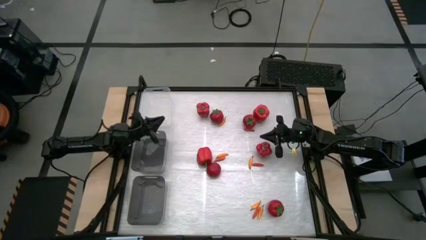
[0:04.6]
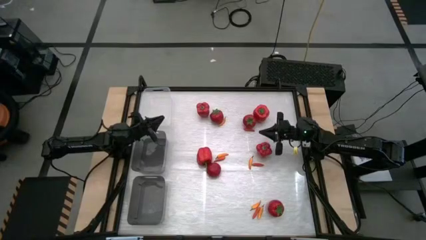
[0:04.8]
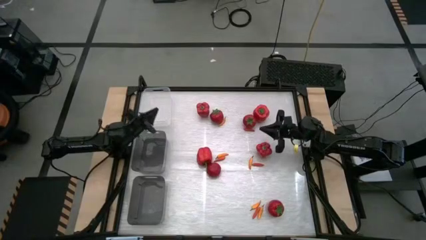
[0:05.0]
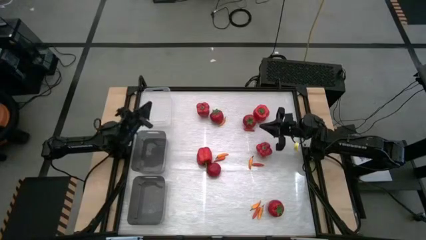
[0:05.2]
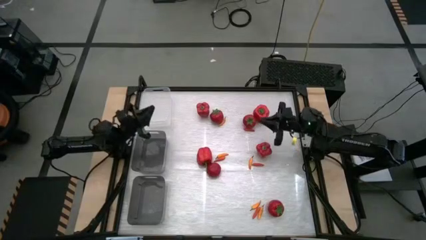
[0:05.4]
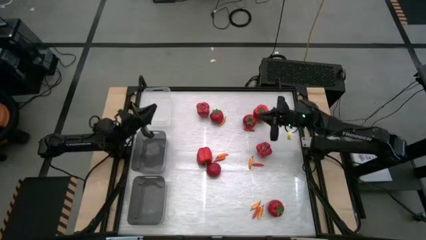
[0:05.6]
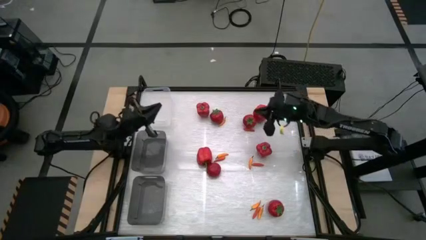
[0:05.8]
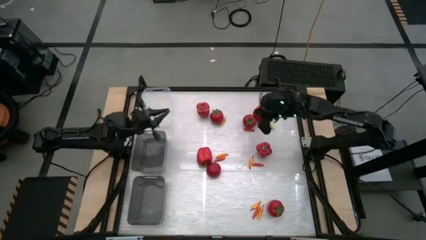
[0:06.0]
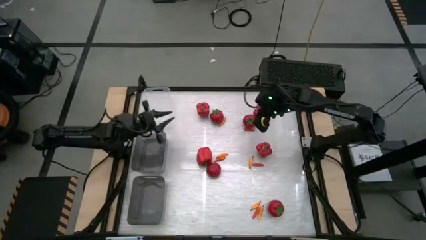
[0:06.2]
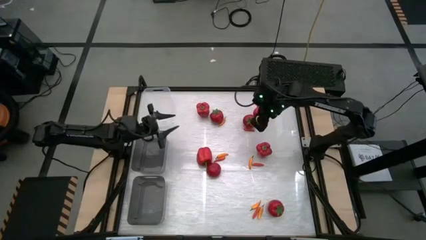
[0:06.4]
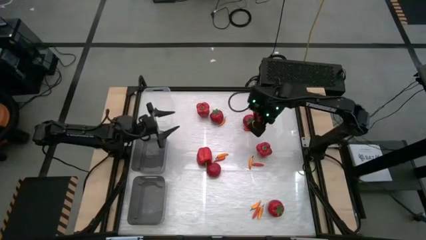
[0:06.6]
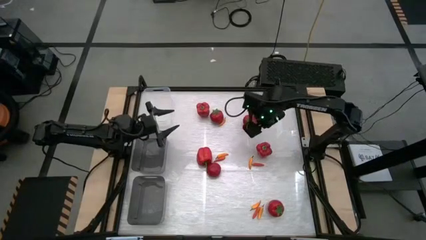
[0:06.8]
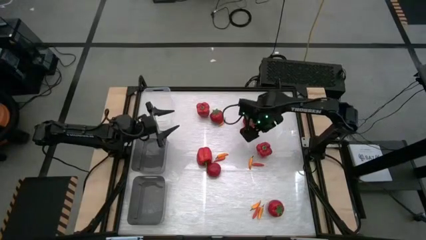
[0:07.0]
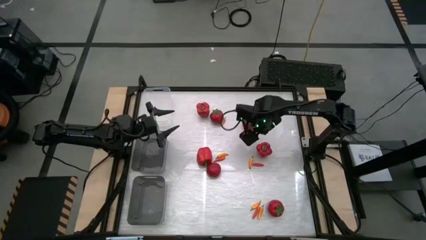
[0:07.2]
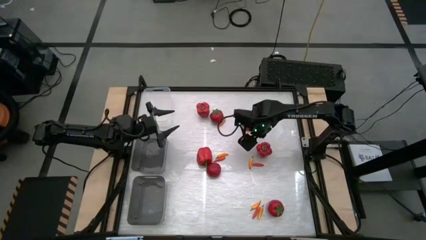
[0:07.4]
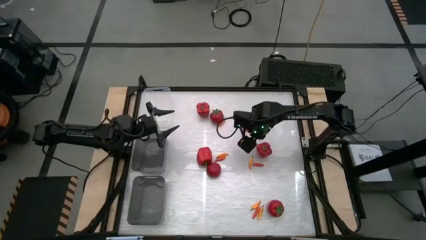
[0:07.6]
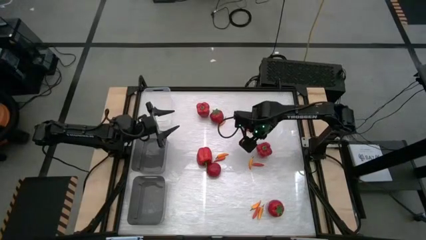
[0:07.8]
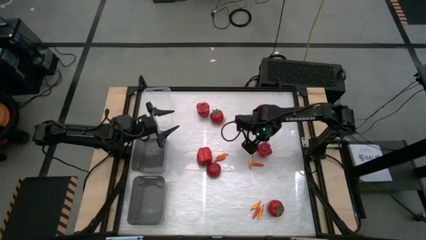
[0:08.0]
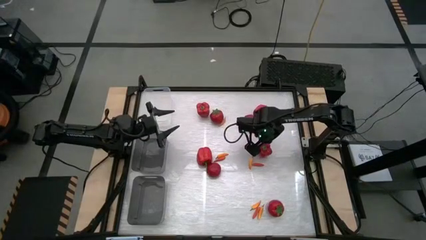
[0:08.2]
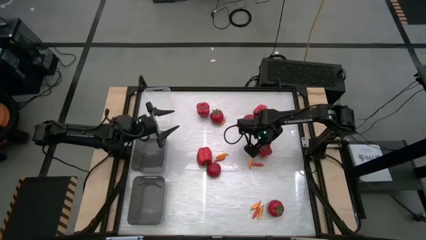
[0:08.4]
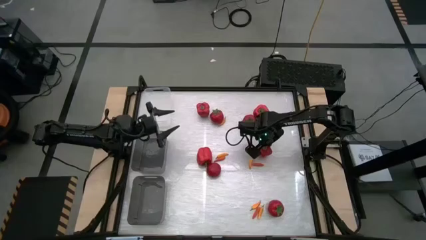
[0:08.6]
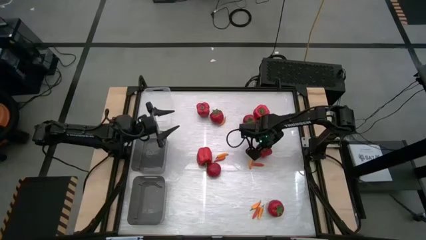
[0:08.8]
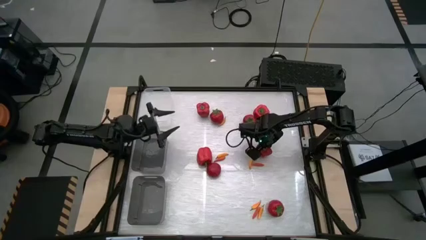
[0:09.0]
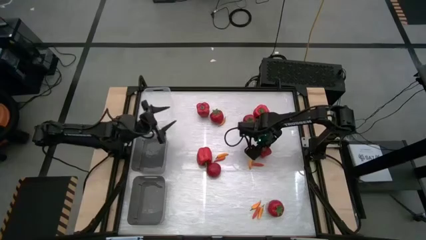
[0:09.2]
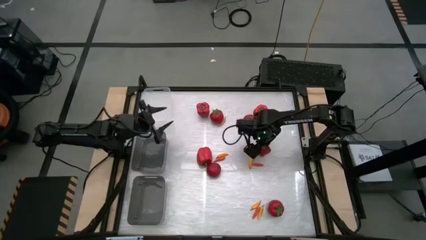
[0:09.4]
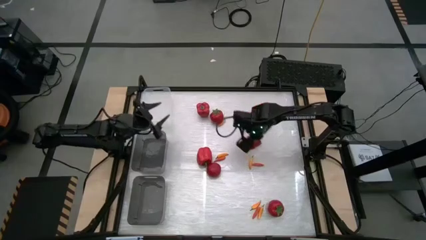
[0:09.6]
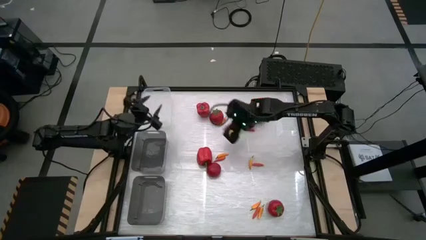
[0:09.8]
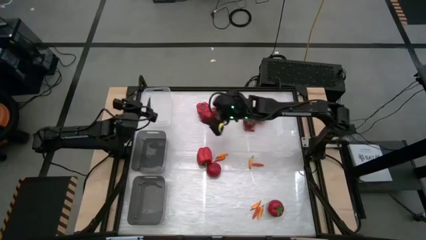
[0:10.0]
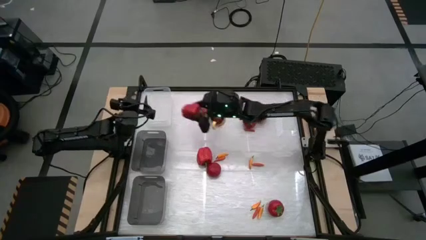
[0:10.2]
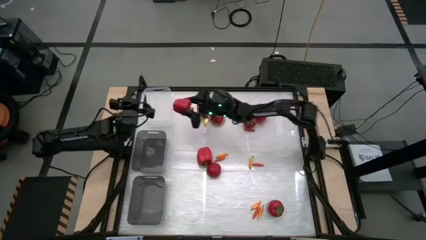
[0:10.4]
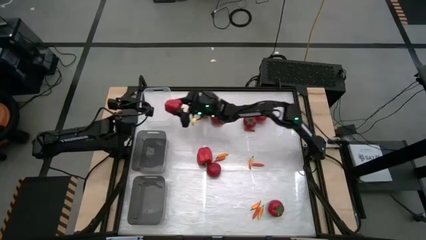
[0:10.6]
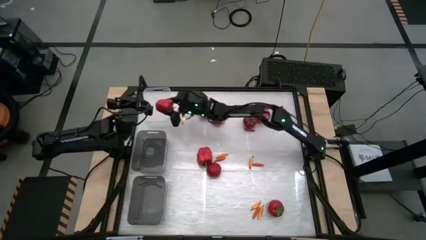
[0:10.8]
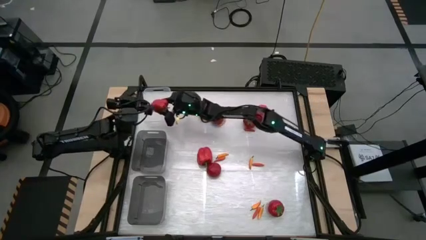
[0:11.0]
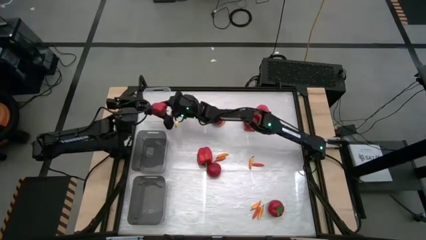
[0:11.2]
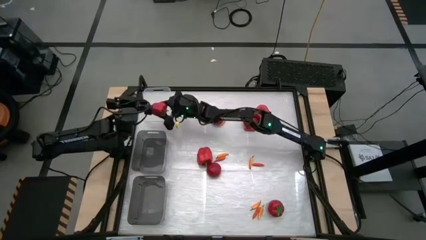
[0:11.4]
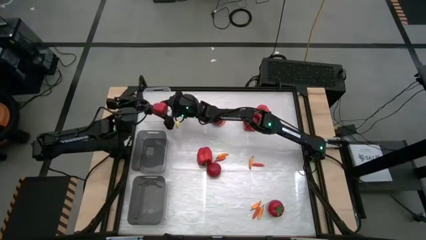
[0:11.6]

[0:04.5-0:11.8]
Task: Sort produce into baskets
Put the middle right red bell pepper into the transparent bin

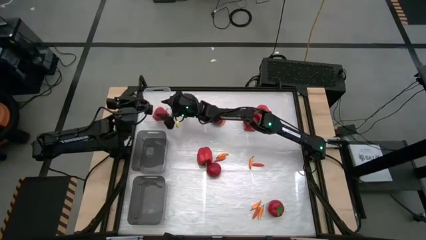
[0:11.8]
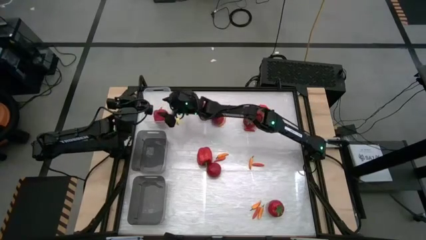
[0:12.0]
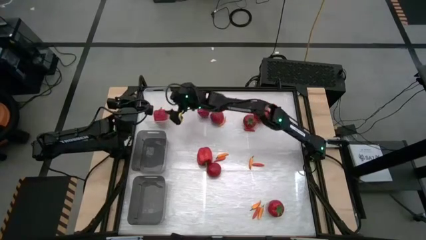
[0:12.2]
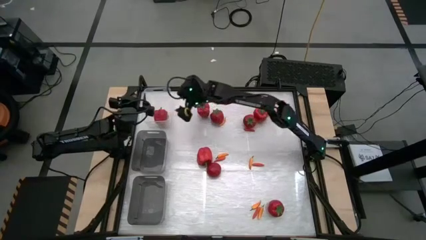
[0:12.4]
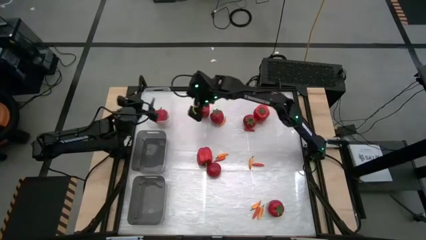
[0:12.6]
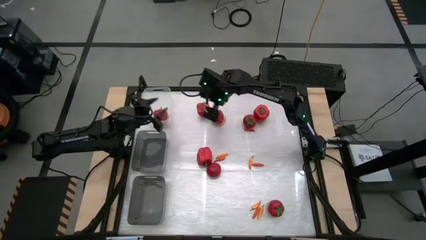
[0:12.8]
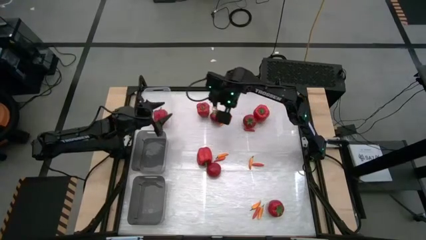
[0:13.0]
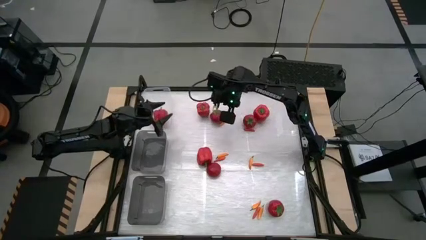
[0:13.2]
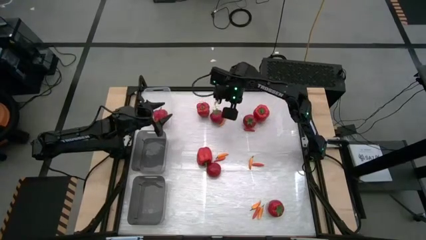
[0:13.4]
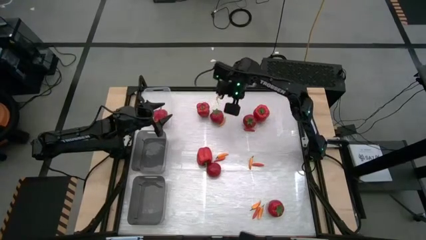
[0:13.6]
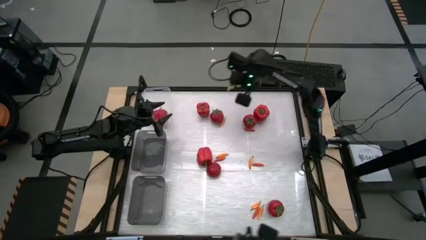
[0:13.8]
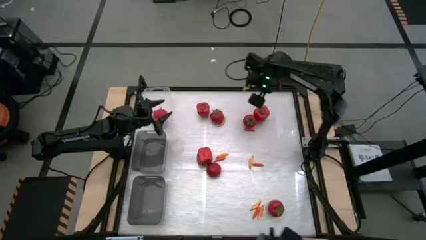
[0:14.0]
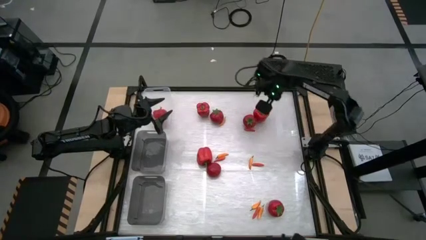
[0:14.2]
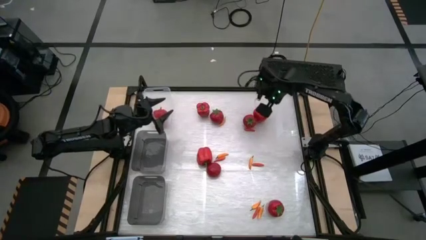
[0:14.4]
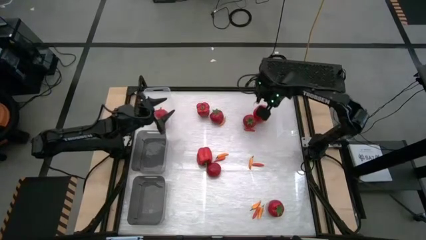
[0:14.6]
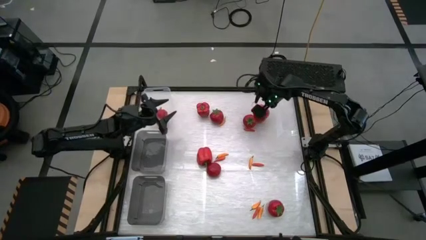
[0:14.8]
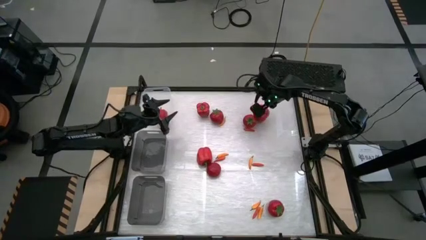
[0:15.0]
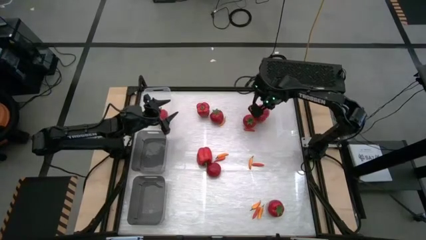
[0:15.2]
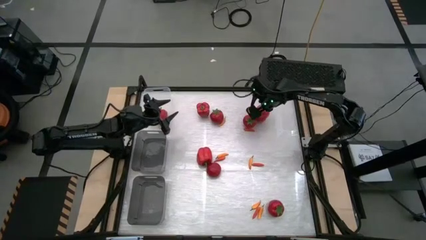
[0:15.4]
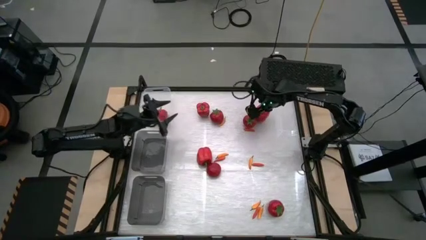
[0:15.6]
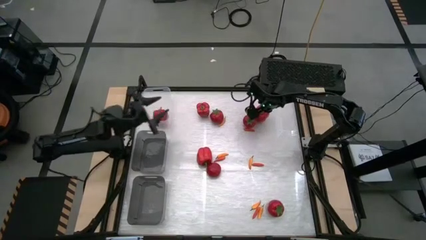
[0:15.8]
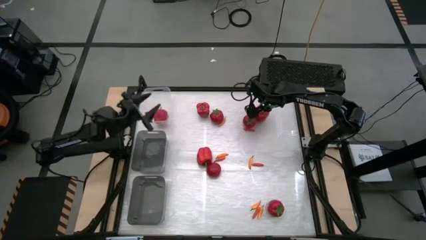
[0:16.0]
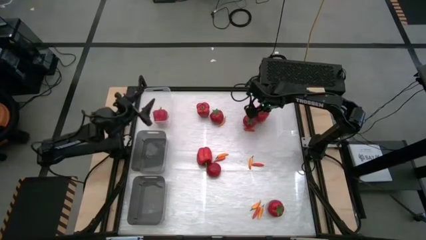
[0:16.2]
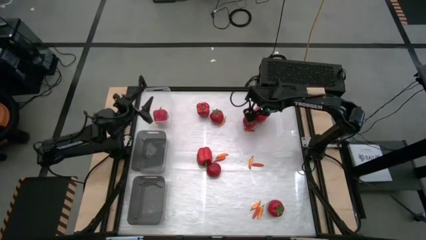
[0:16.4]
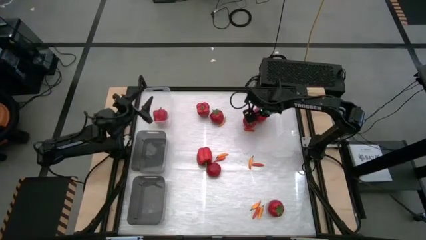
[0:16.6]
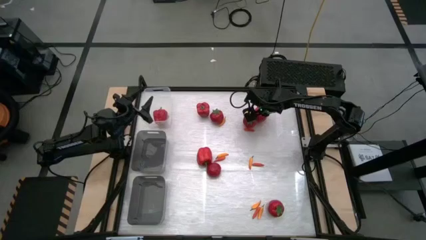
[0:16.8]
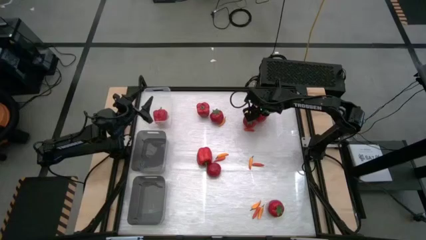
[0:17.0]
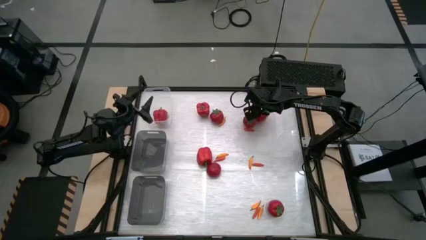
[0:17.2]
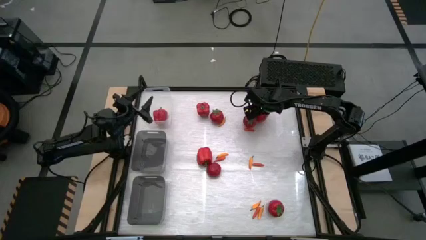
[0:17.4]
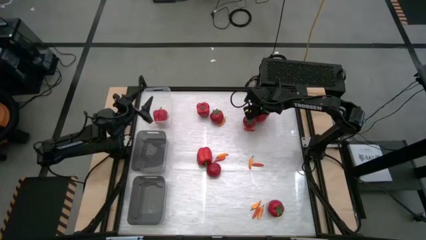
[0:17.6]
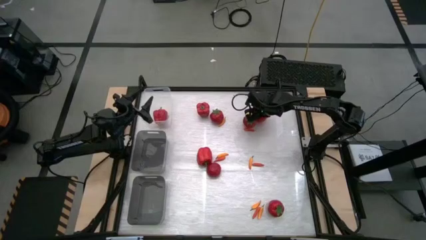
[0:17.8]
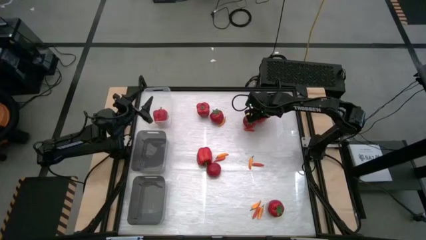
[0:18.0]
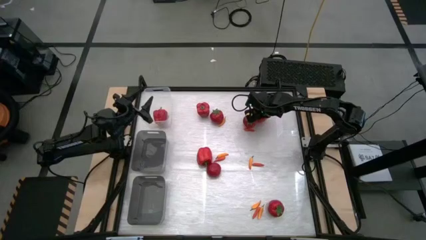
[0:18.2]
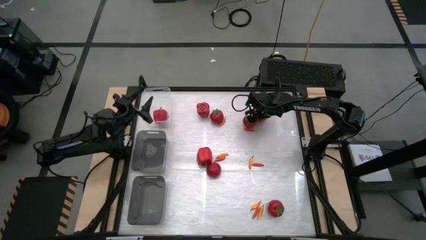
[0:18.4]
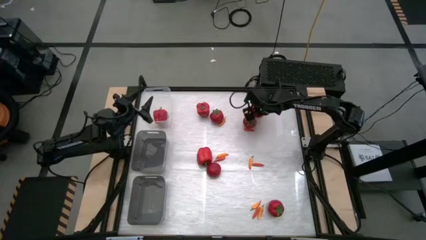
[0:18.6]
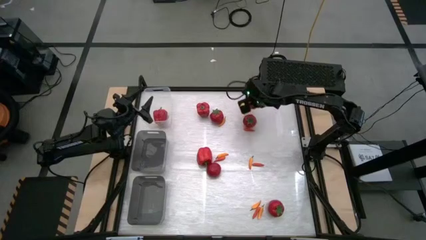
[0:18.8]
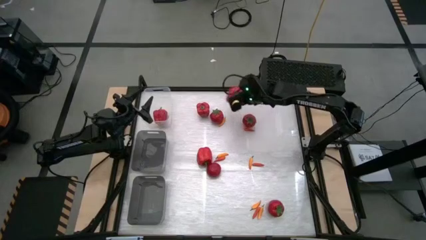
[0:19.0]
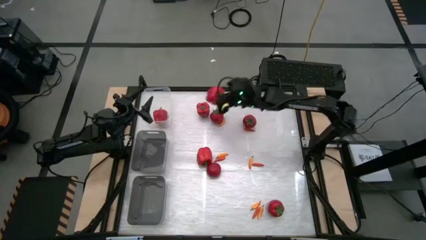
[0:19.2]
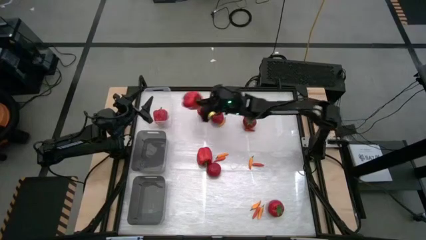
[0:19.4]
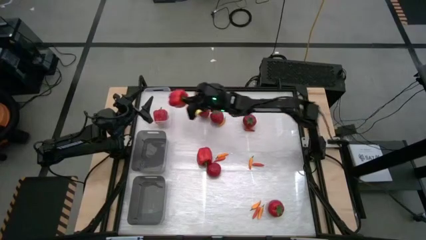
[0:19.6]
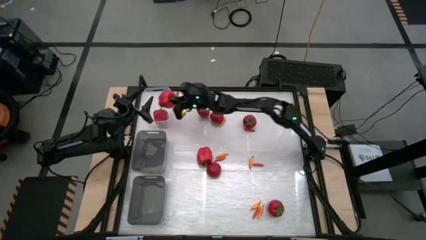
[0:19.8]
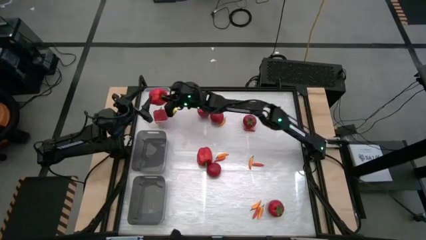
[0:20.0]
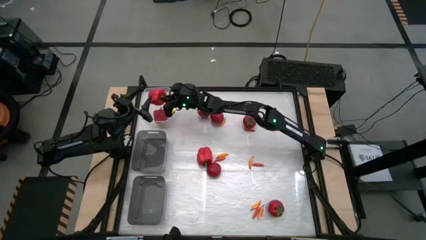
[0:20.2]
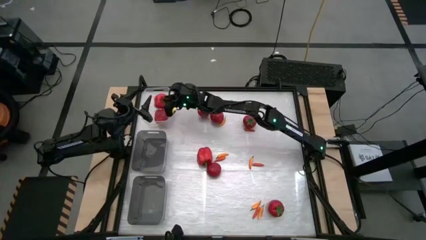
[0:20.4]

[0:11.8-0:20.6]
Put the top right red bell pepper into the transparent bin
